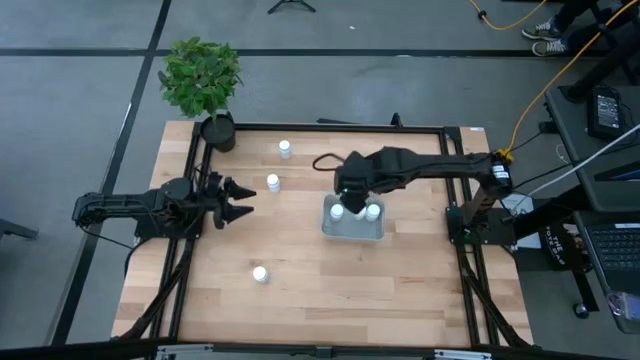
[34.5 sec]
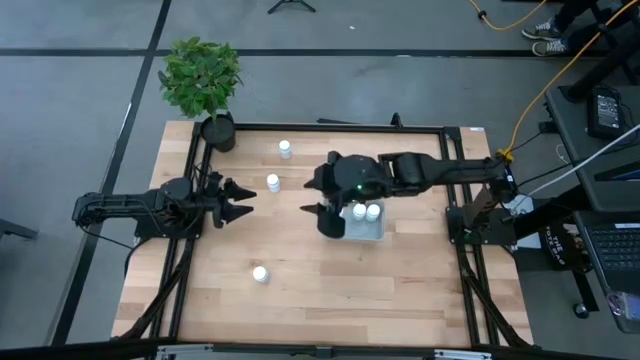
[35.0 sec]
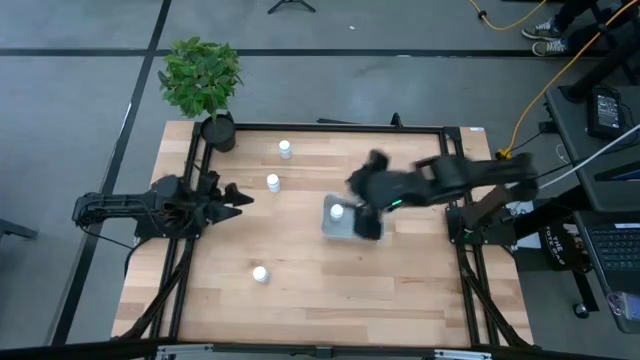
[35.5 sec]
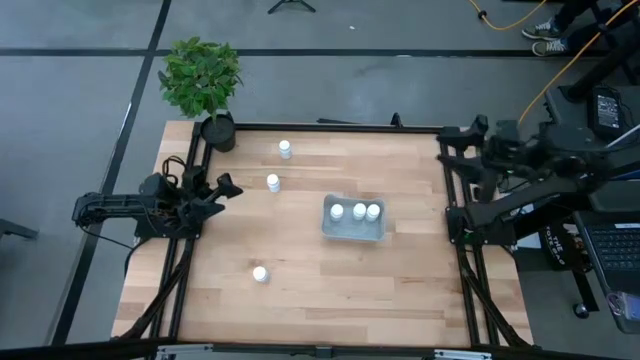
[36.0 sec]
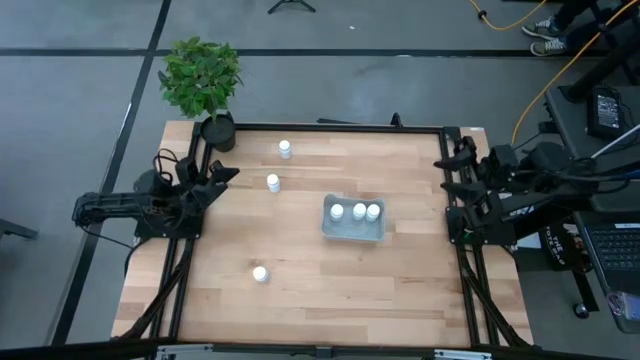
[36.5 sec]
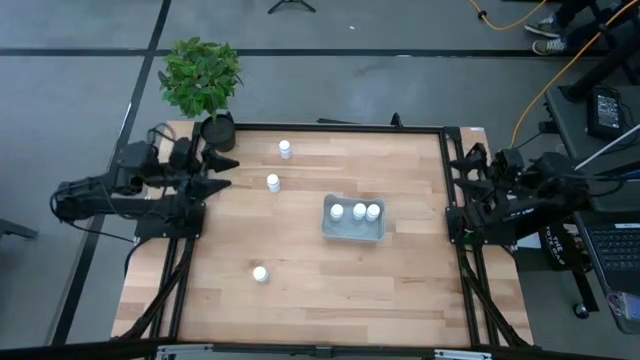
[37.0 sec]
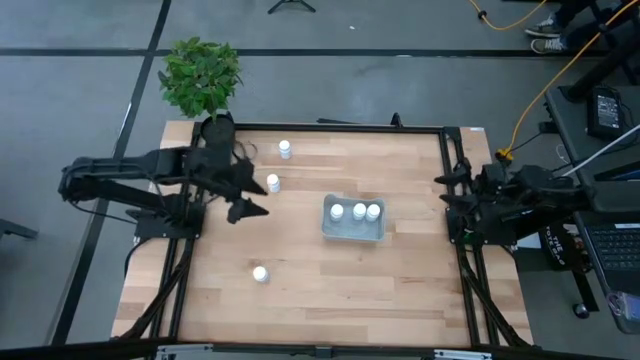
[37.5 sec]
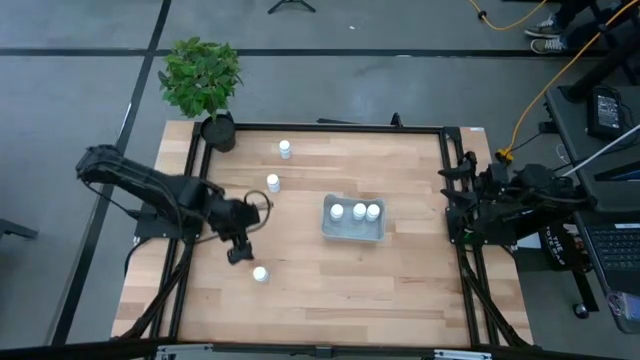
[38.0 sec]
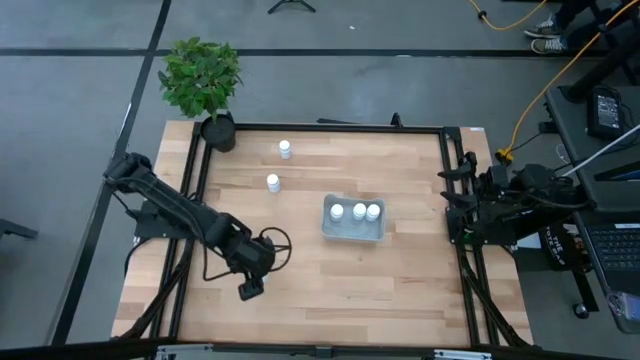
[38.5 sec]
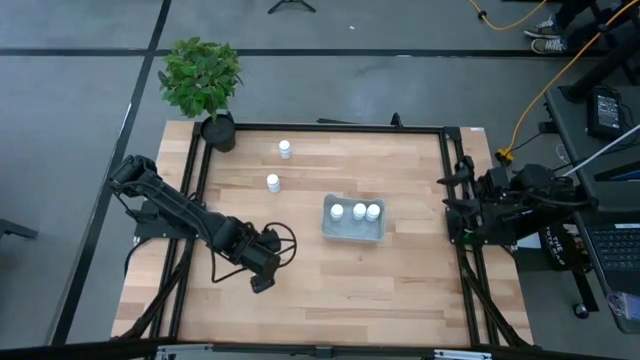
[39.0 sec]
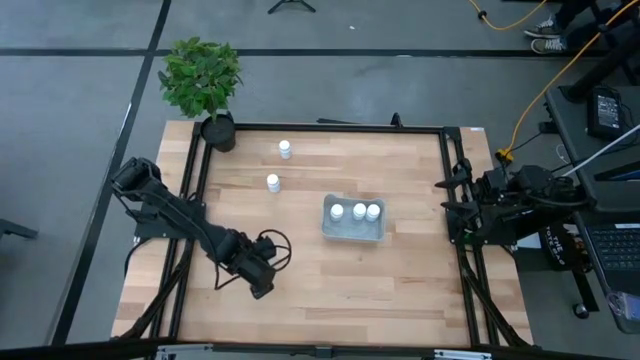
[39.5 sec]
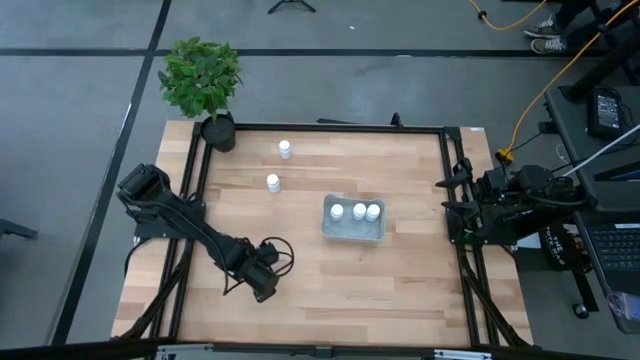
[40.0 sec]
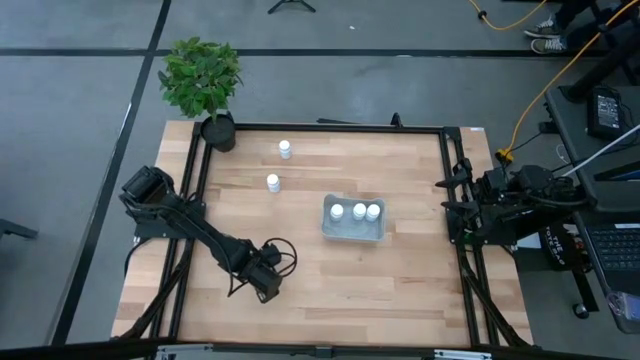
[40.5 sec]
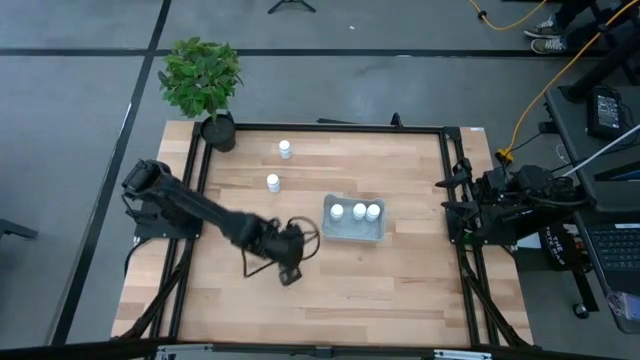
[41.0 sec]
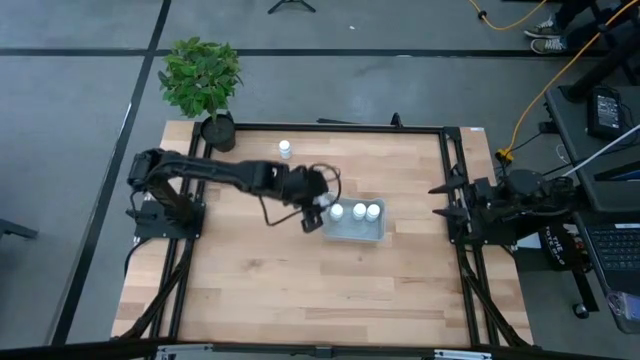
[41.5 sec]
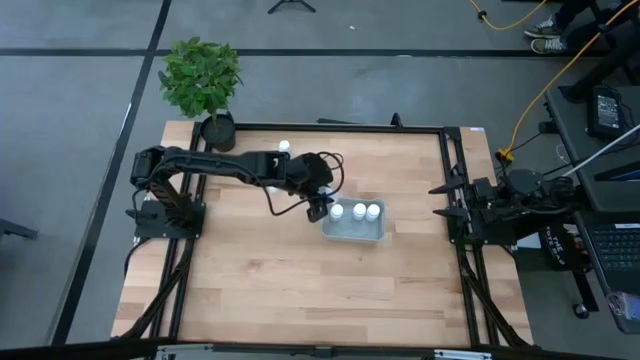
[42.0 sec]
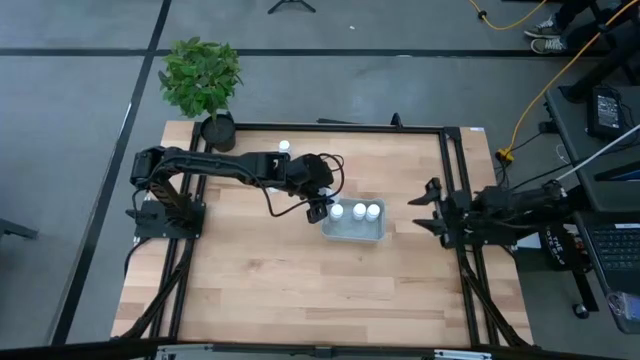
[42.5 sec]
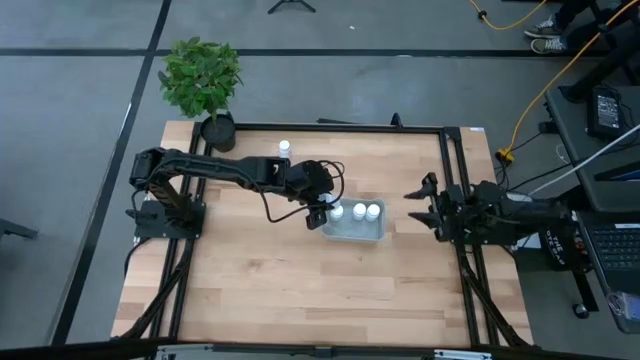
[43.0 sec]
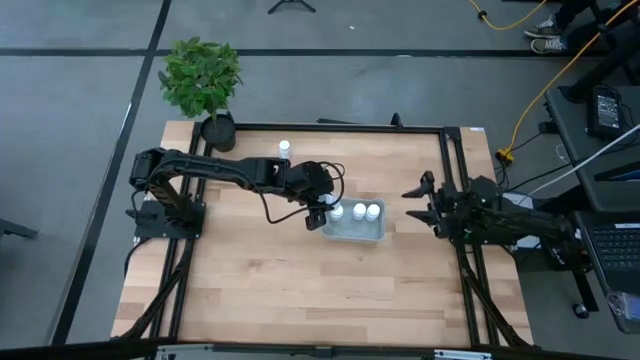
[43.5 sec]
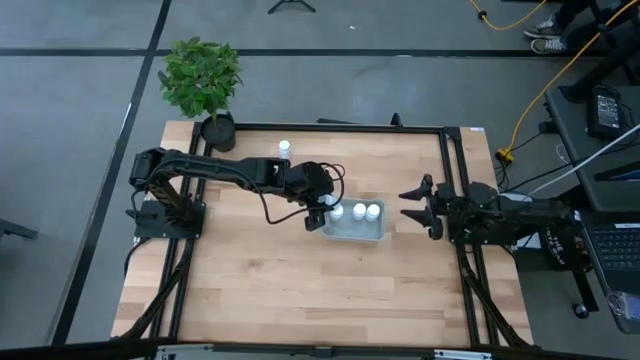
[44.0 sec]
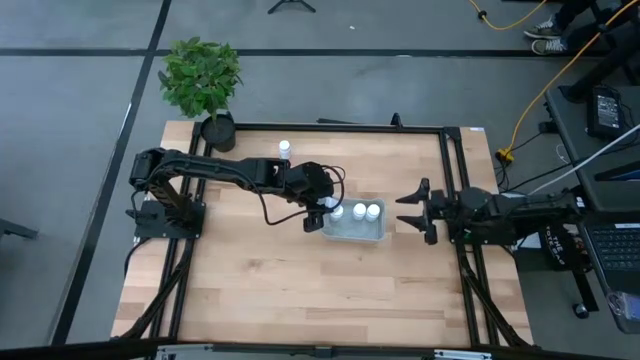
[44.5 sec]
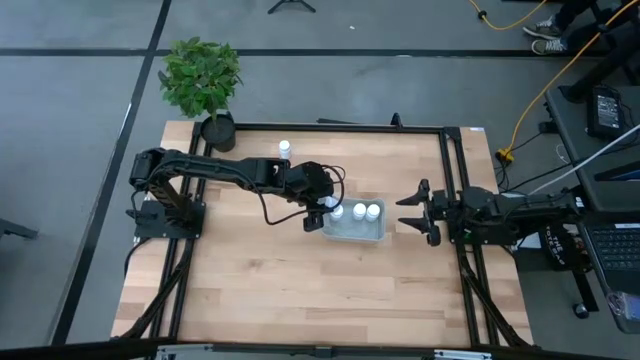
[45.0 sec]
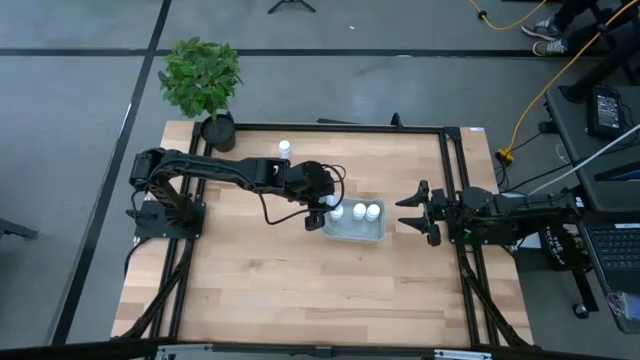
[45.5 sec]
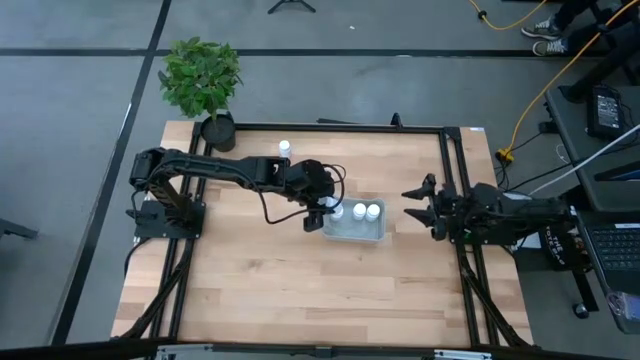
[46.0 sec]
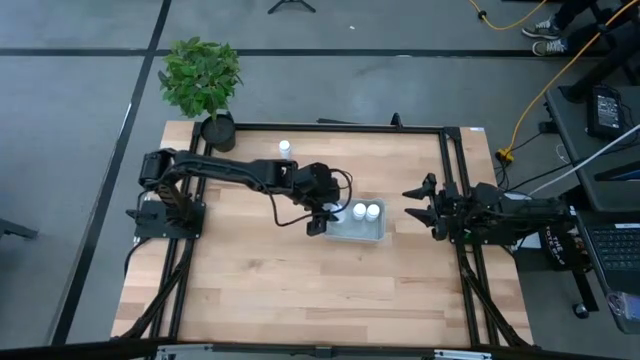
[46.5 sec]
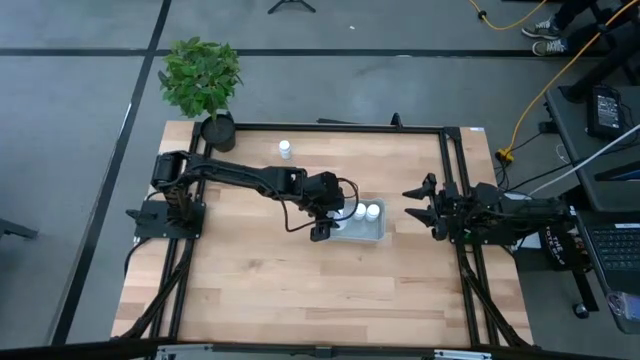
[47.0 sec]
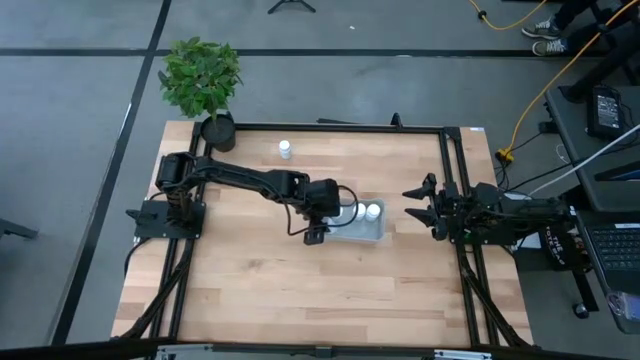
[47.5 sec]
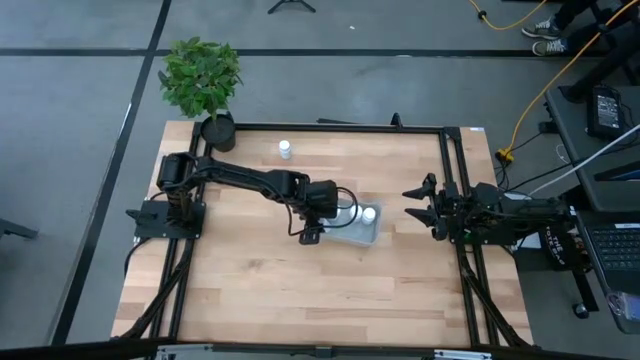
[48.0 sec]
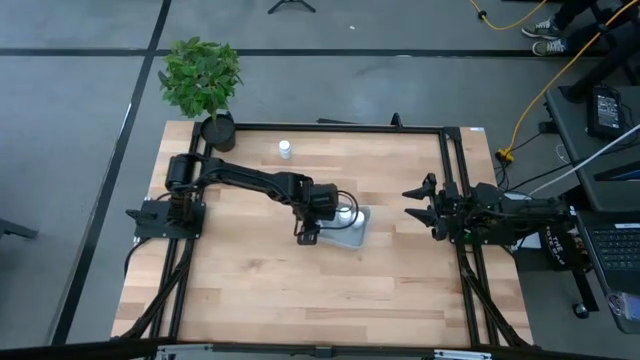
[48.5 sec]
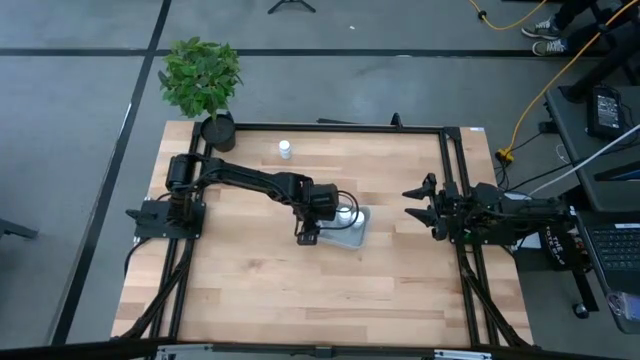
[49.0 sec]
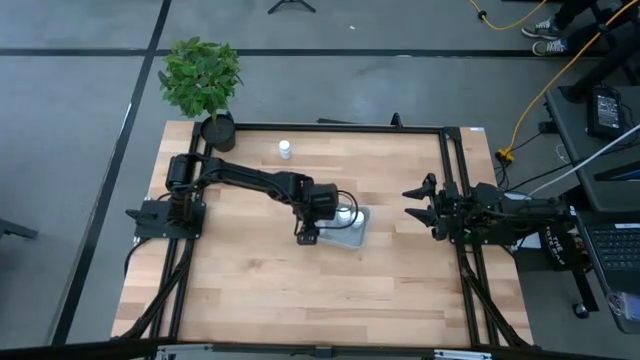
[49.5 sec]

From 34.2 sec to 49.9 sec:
Task: Pick and place pill bottles into a basket
Put the bottom white large pill bottle into the bin

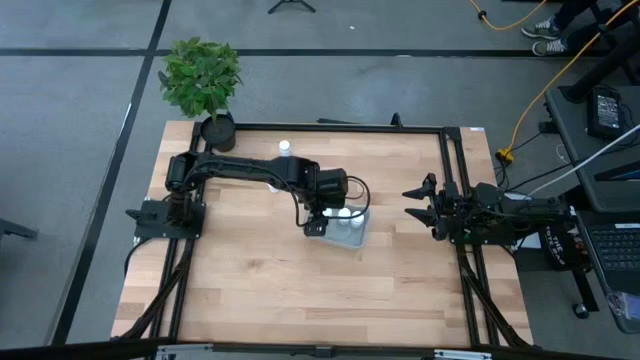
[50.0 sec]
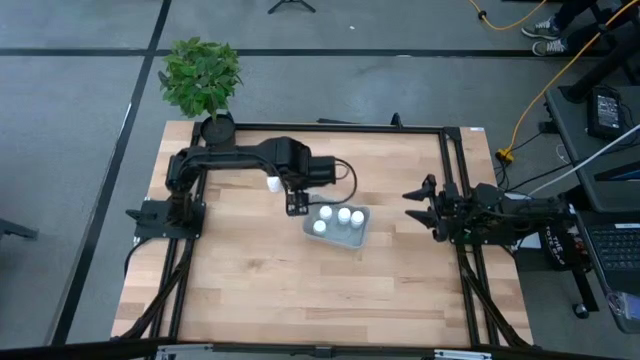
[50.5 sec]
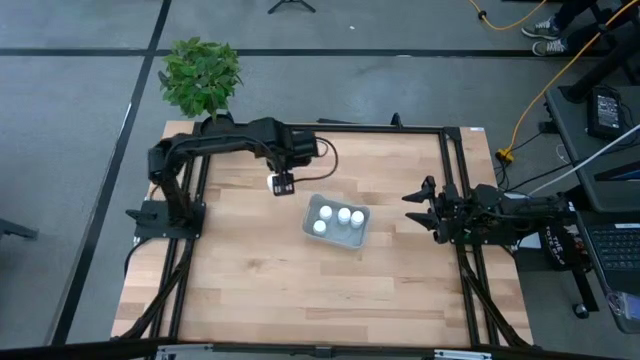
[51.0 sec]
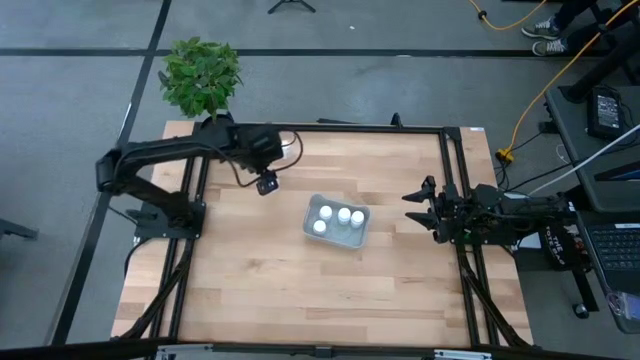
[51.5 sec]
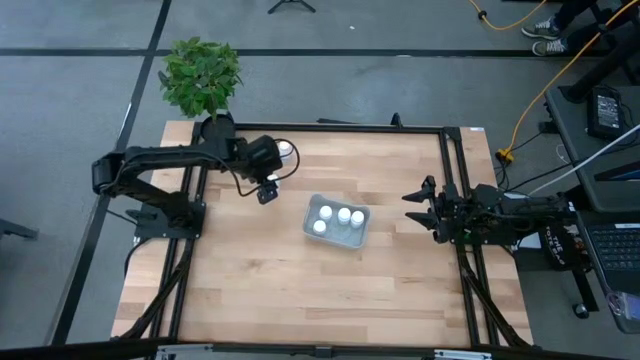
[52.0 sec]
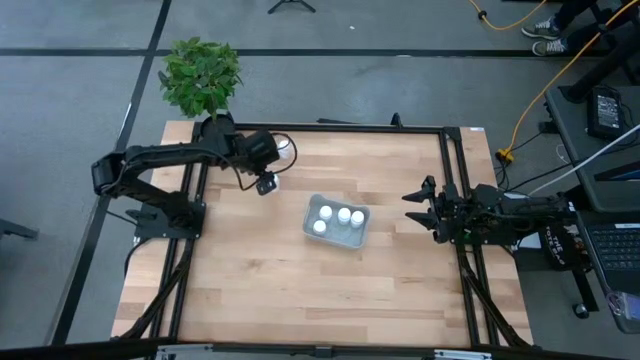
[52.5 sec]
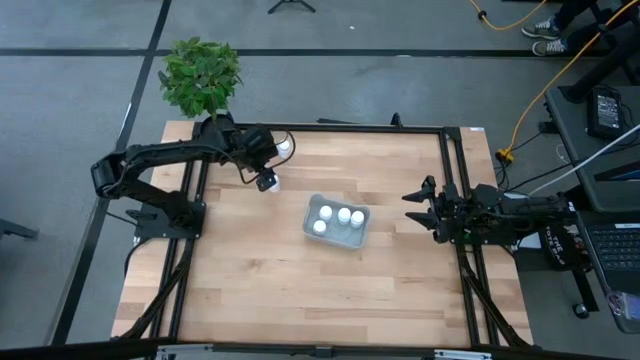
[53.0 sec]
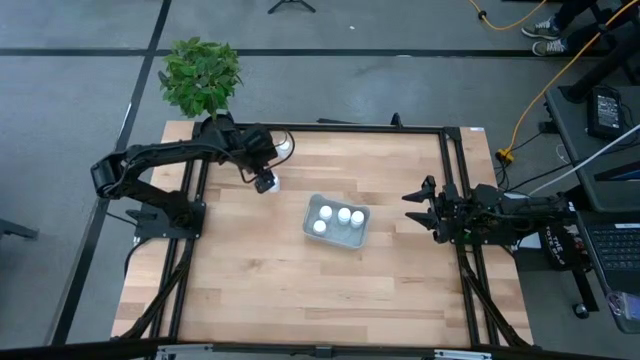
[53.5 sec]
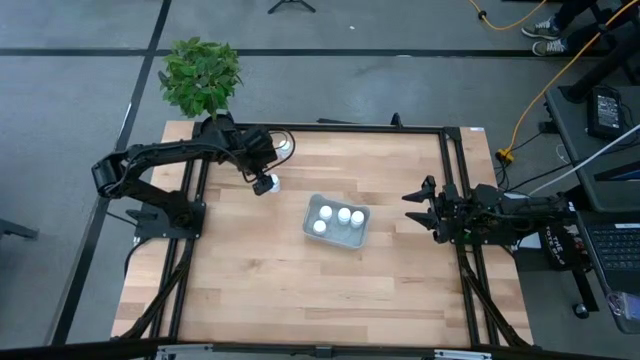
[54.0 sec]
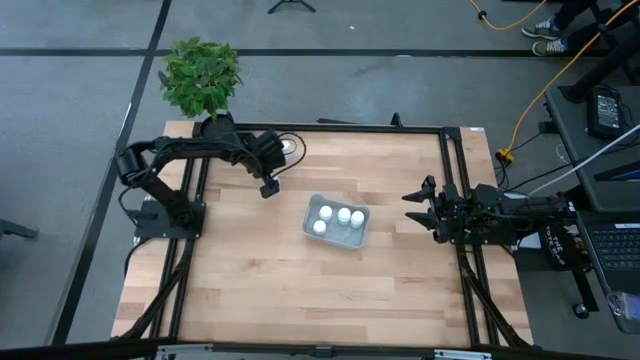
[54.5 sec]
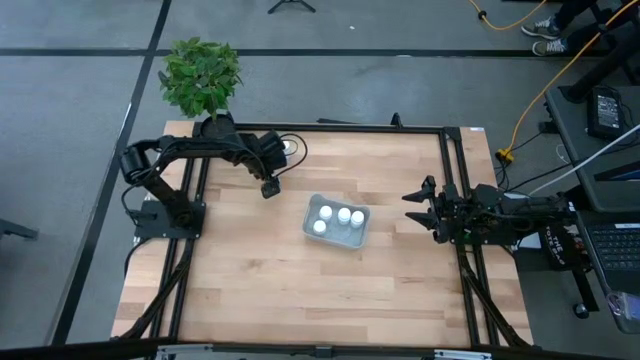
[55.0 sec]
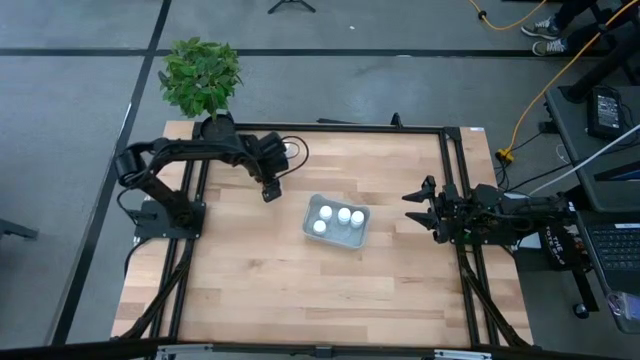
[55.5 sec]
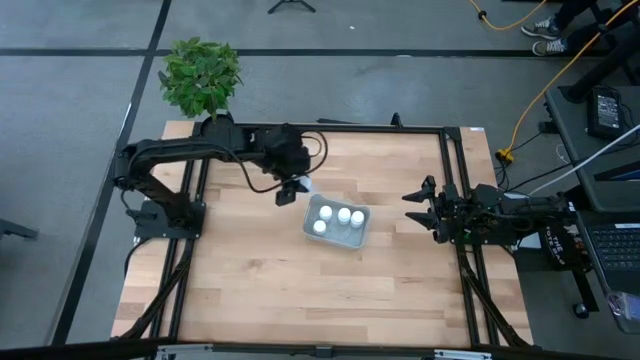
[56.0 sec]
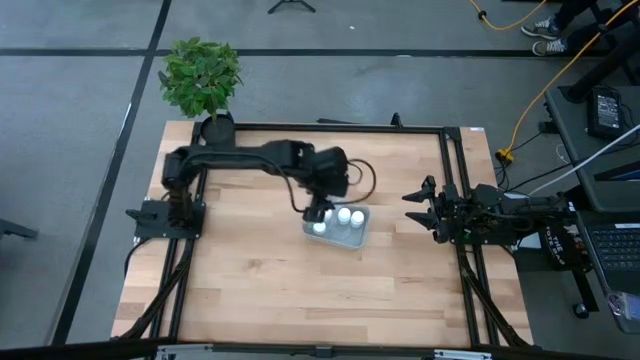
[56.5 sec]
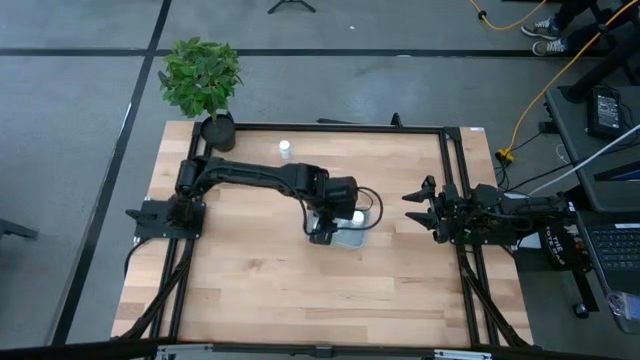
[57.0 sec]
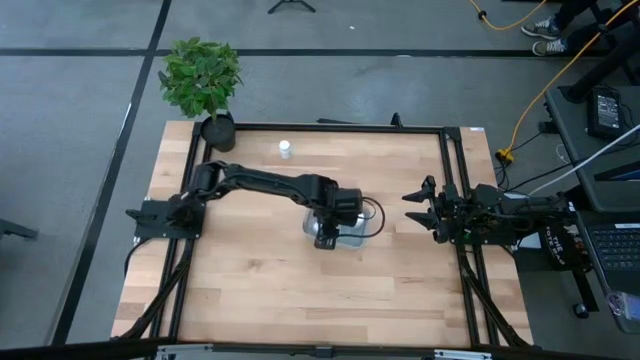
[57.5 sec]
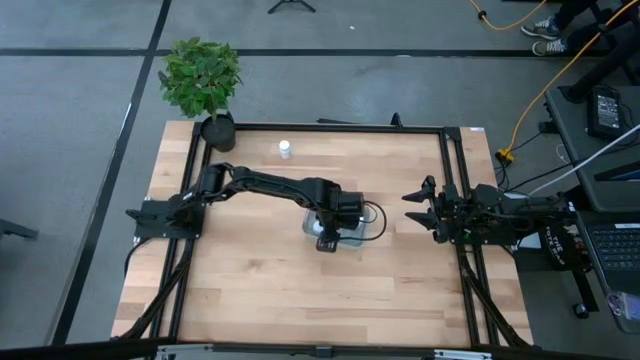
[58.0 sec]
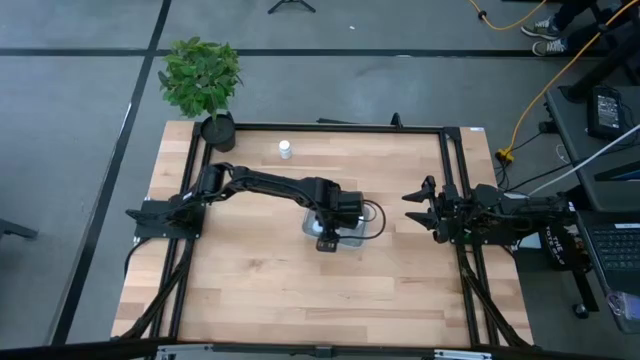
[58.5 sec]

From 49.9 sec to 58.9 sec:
Put the bottom white large pill bottle into the bin
